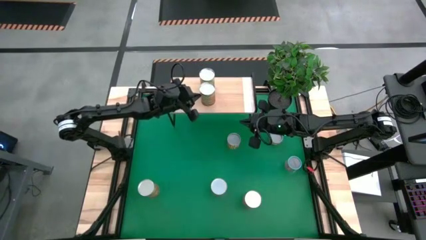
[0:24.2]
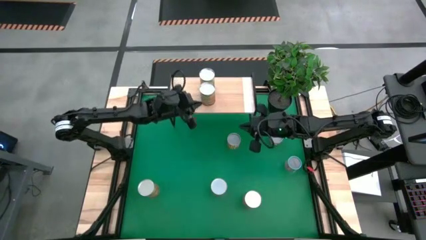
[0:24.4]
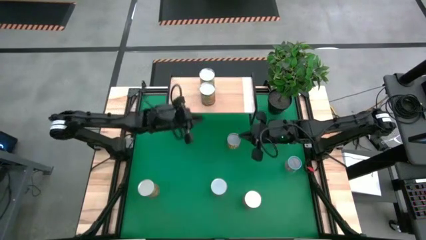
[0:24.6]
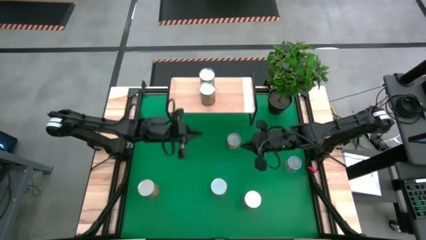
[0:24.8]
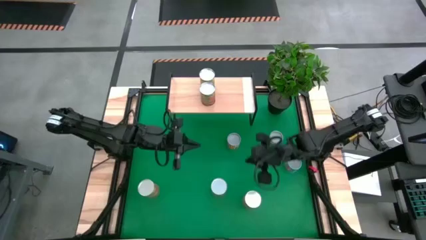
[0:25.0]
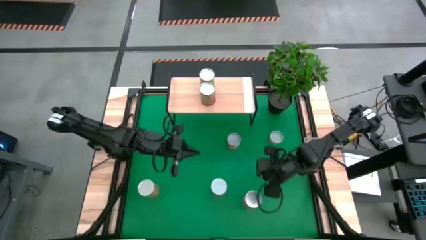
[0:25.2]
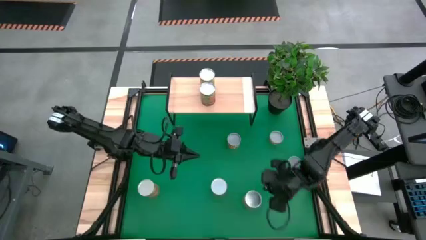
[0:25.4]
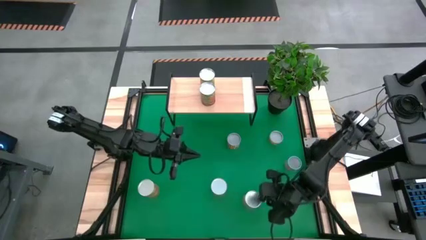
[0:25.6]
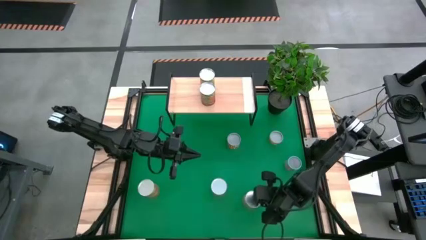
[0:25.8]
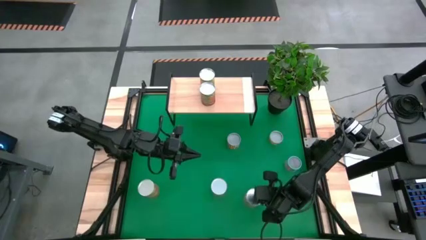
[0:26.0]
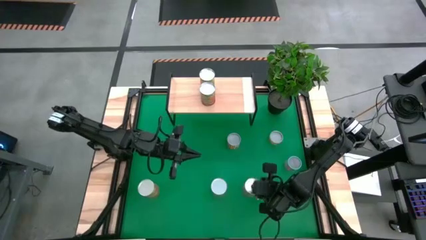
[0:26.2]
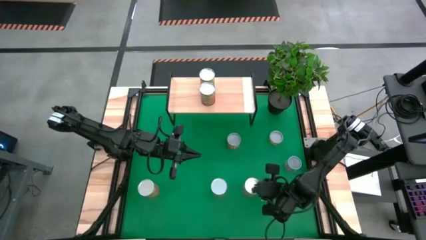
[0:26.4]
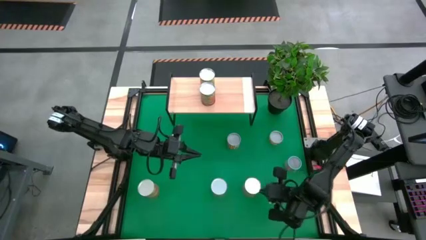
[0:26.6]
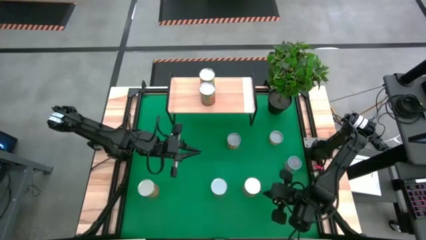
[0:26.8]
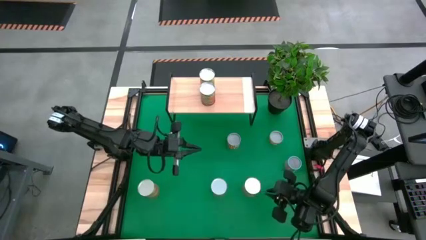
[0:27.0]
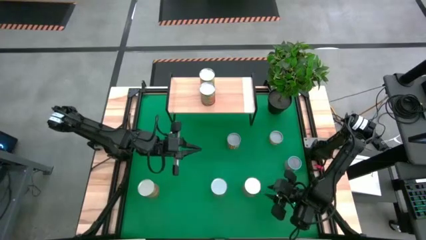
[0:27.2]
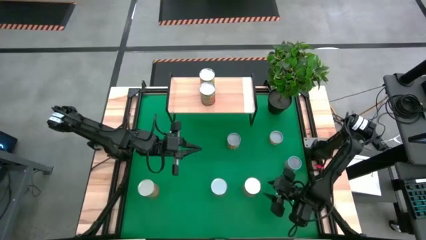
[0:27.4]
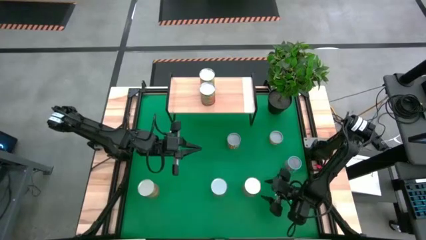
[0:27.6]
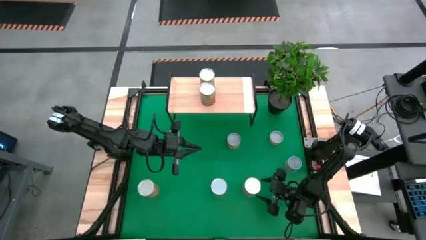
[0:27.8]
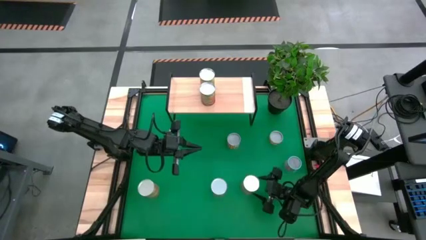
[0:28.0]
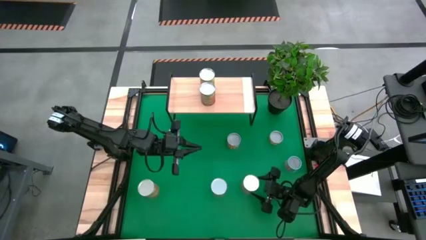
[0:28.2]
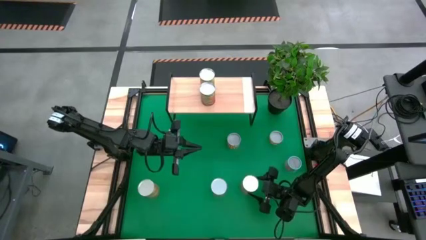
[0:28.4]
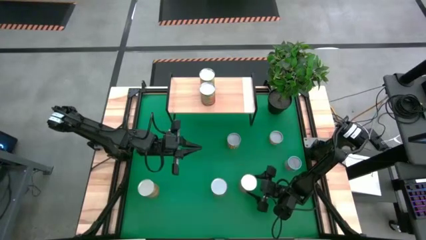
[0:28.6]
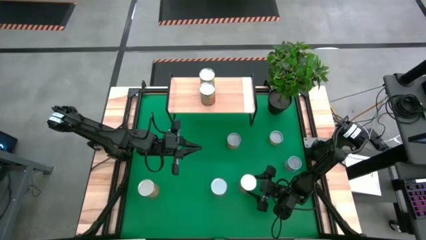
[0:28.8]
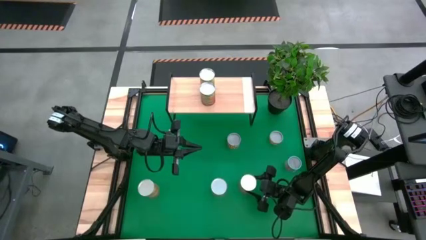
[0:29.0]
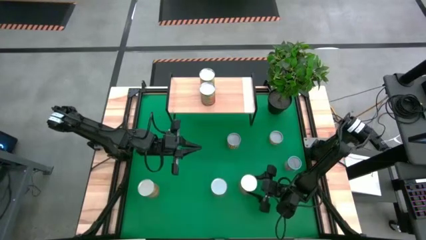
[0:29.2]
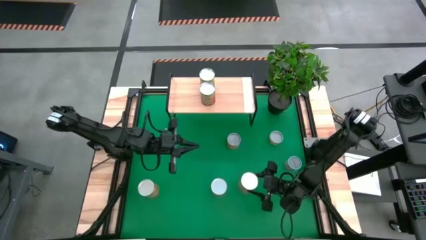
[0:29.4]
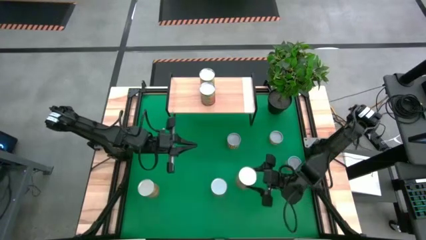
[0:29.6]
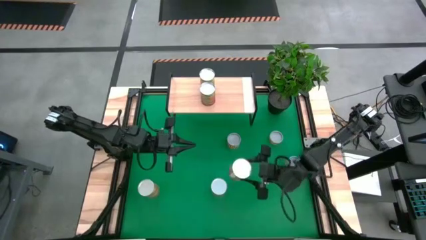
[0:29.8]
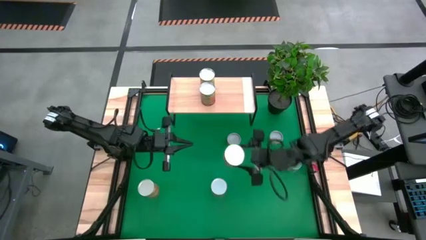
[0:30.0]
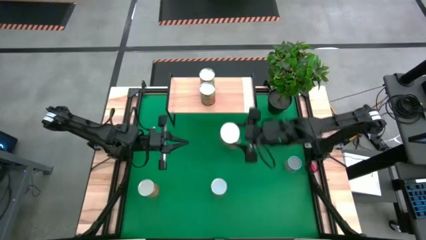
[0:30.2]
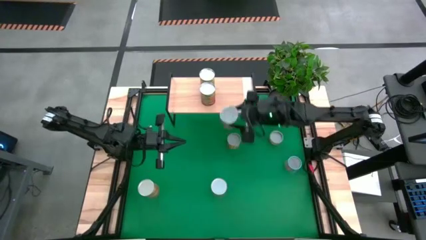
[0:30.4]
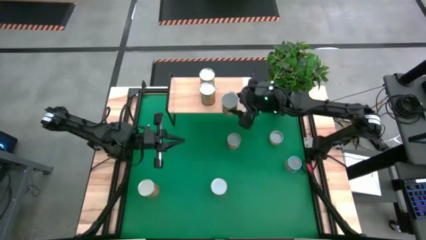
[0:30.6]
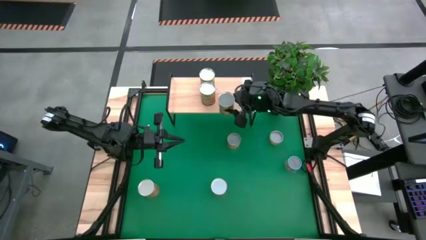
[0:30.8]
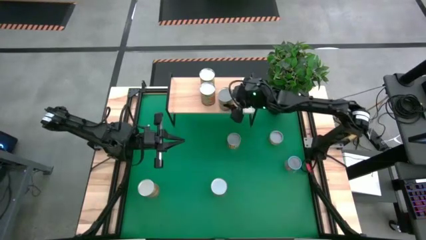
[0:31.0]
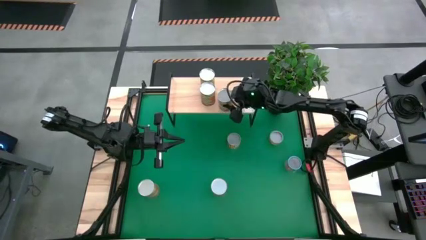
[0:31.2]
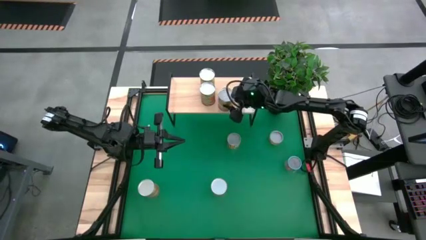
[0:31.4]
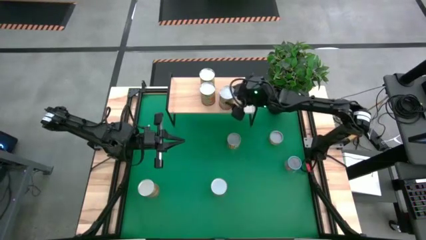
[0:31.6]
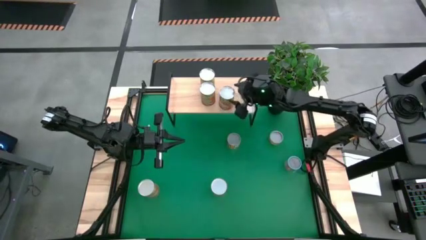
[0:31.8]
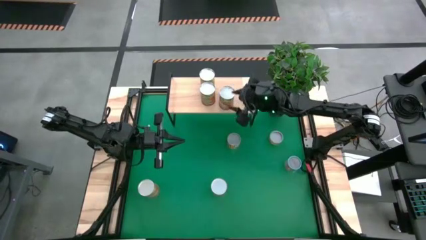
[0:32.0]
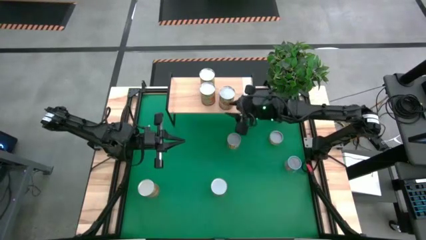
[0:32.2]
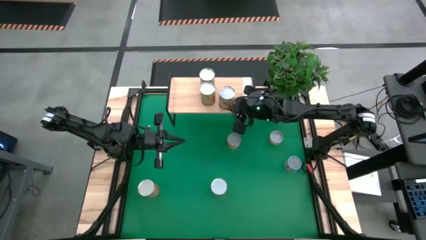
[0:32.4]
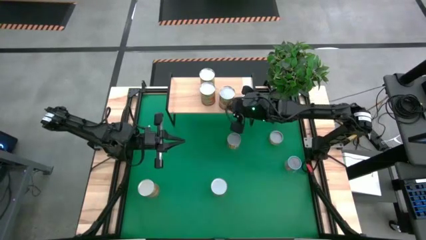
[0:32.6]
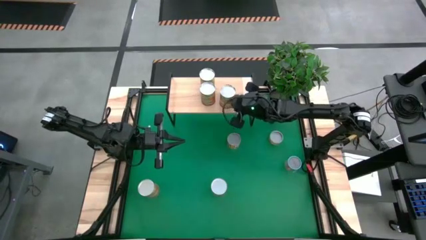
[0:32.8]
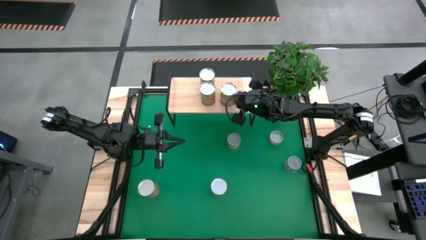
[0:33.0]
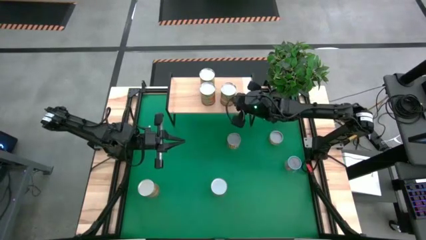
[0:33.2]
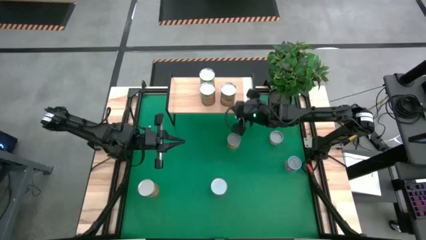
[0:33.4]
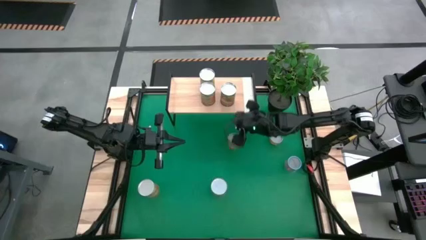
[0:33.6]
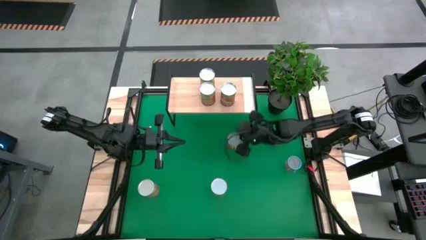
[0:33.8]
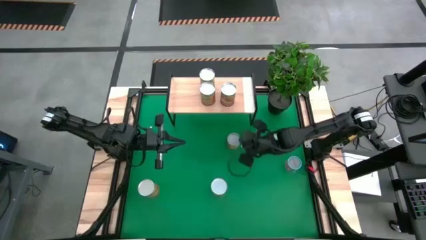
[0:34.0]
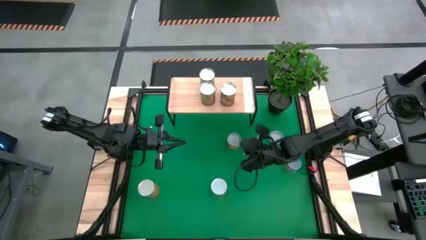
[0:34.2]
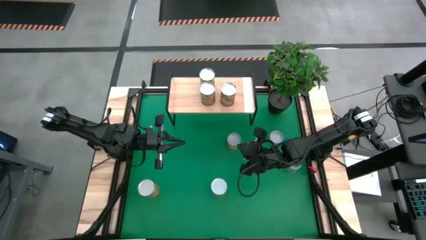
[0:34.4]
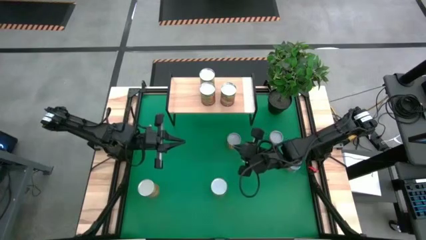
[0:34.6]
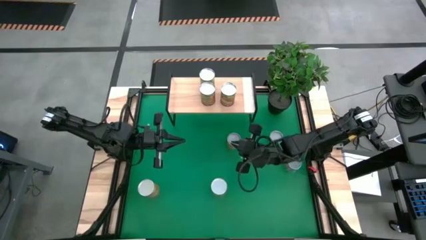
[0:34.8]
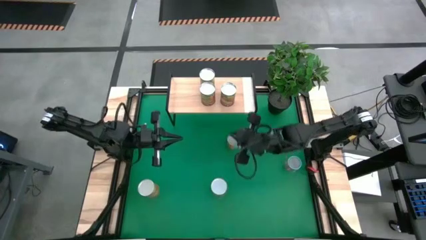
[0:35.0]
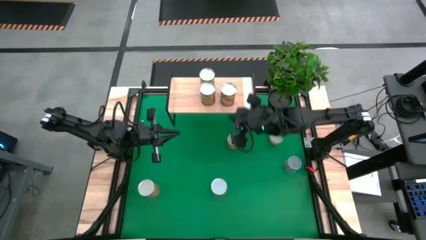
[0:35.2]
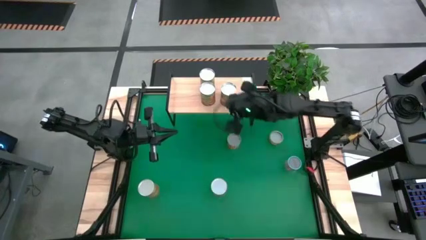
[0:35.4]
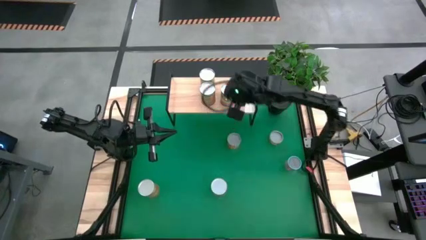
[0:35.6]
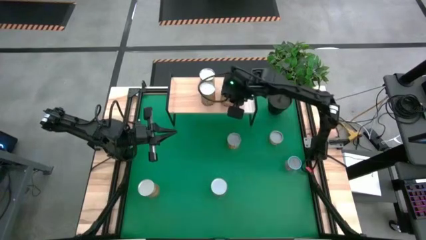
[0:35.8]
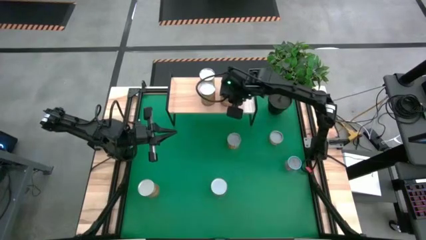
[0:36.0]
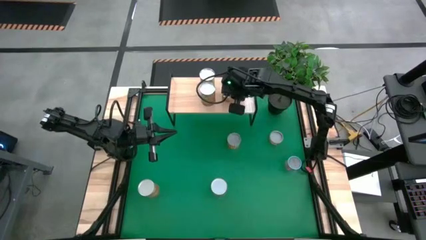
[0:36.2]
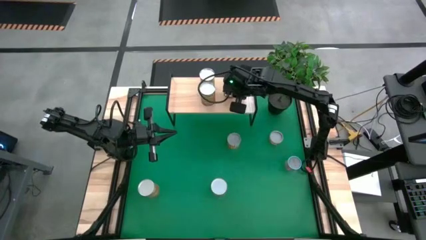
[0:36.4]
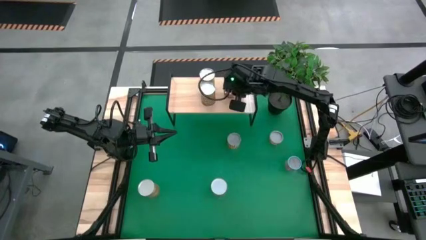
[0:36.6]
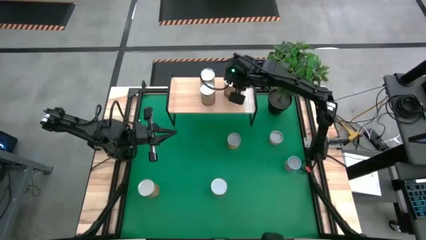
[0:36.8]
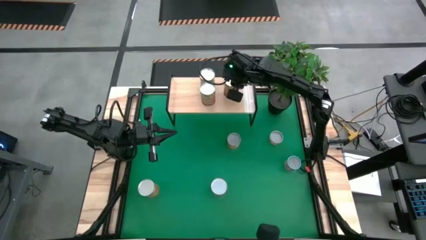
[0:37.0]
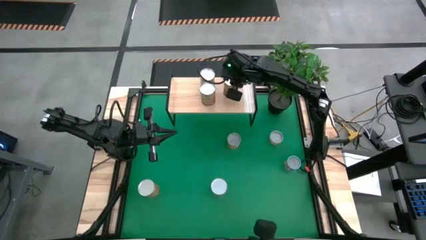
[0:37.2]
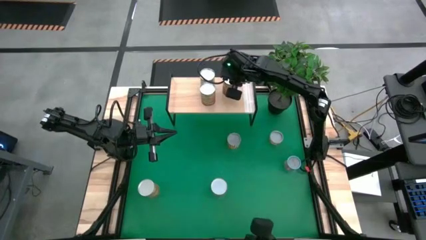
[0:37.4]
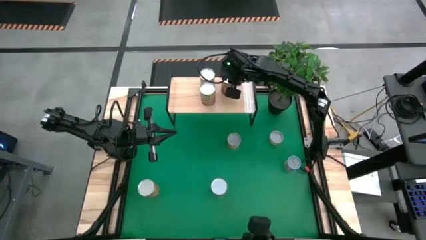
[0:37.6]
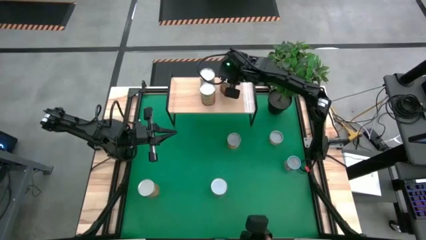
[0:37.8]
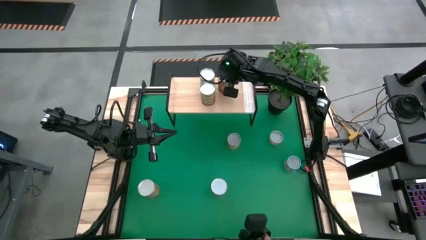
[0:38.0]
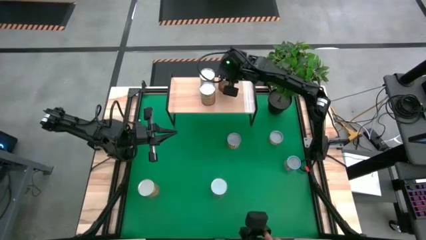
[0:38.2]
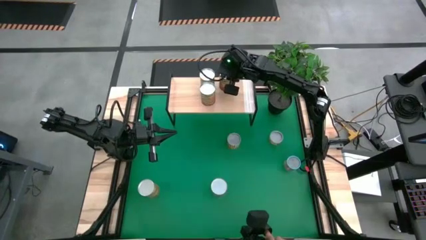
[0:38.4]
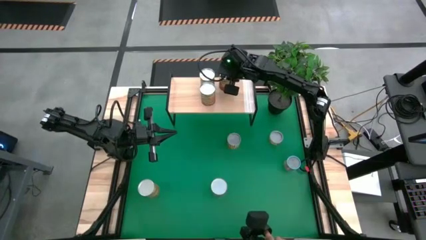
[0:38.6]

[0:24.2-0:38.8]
Task: Pick and place cans onto a shelf
Put the right canned corn on the shelf
